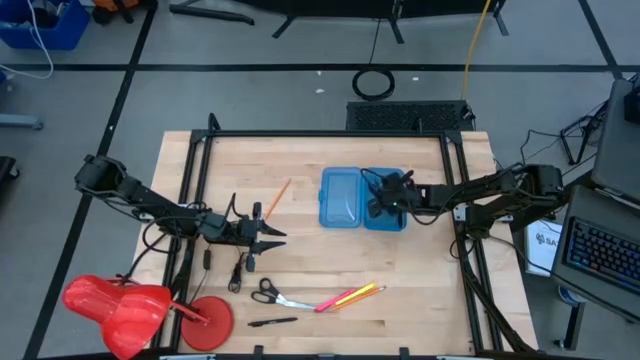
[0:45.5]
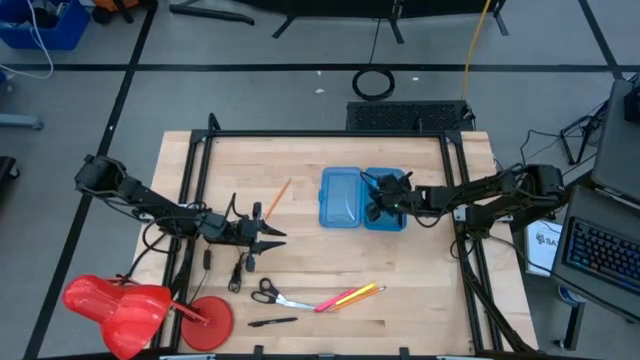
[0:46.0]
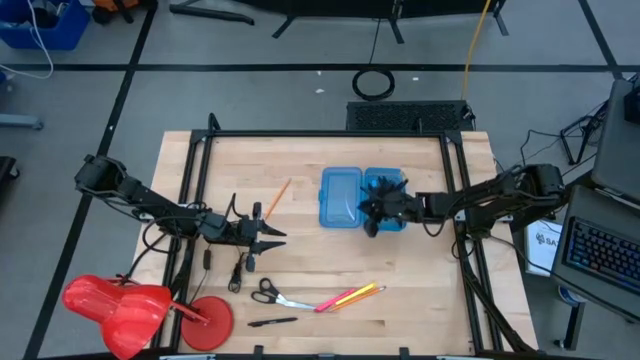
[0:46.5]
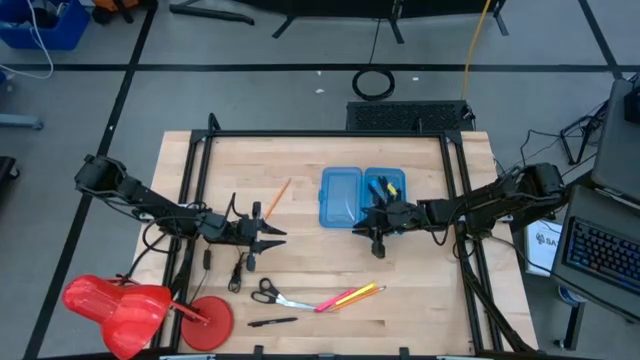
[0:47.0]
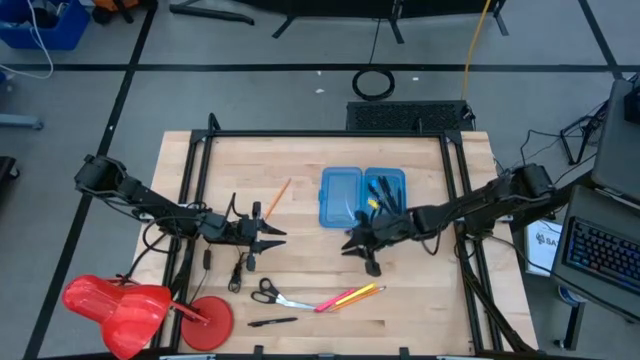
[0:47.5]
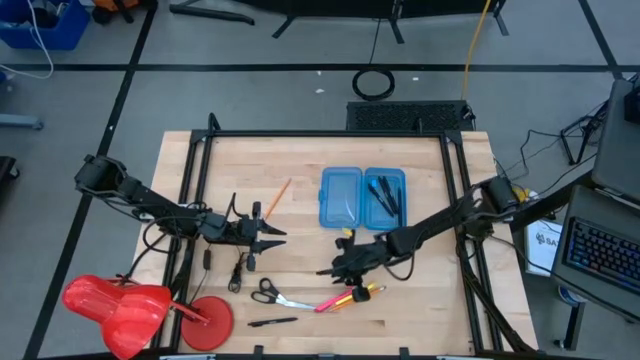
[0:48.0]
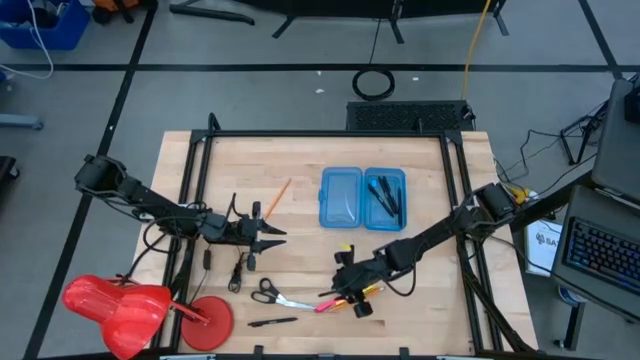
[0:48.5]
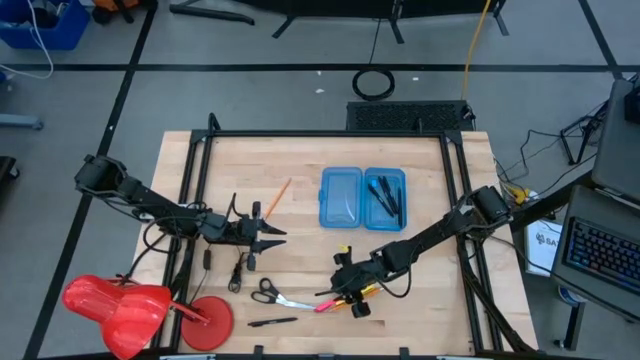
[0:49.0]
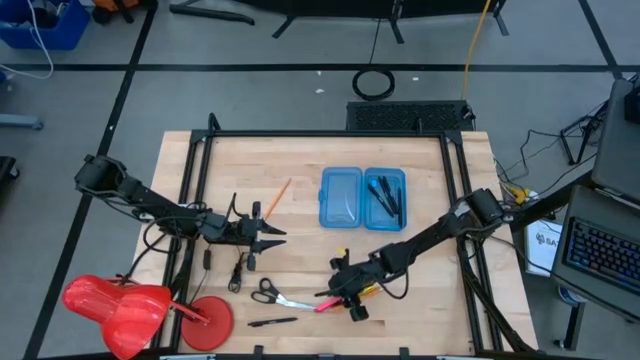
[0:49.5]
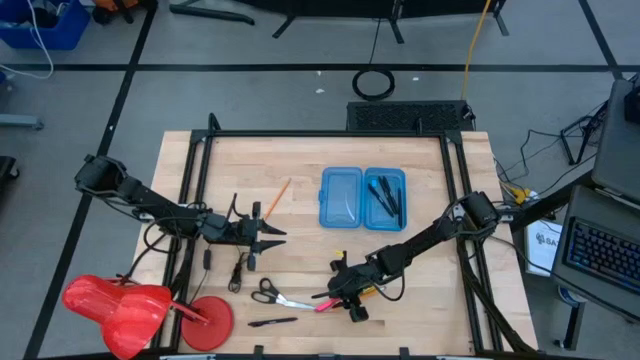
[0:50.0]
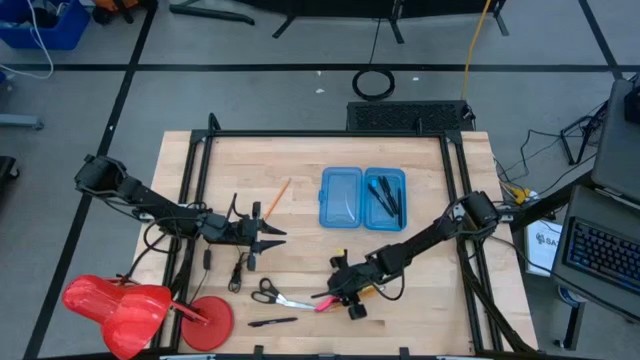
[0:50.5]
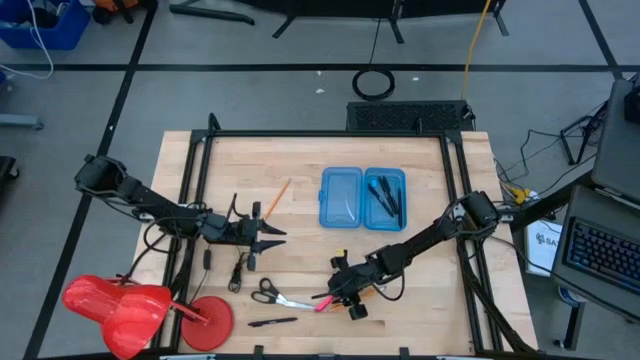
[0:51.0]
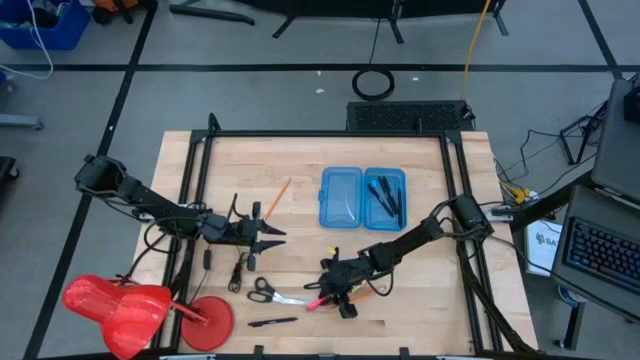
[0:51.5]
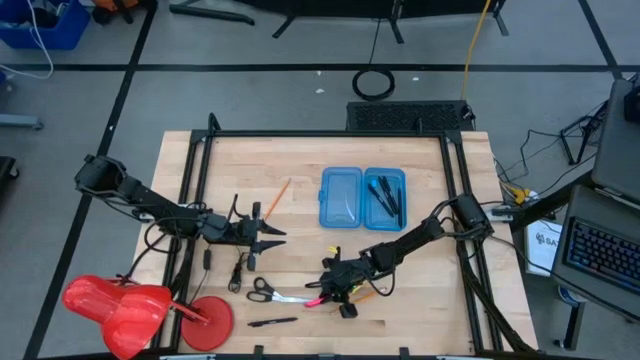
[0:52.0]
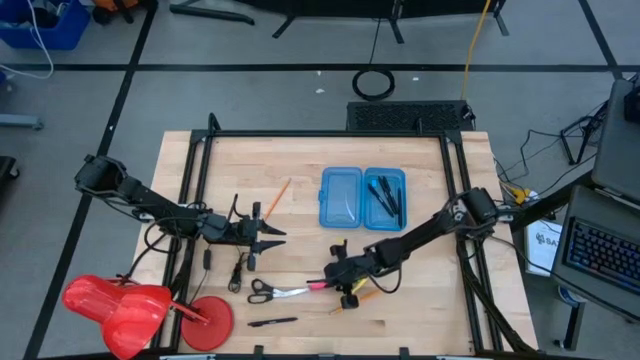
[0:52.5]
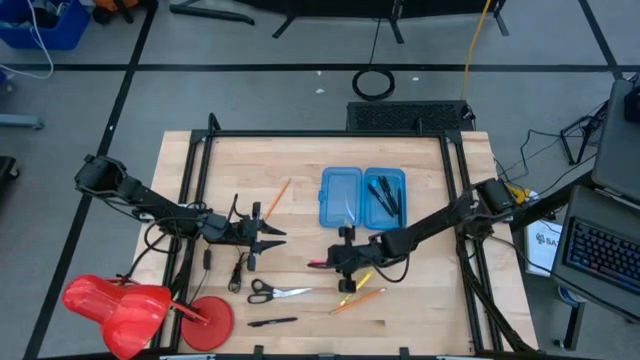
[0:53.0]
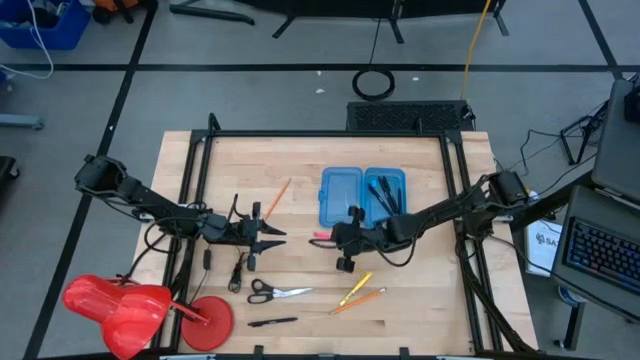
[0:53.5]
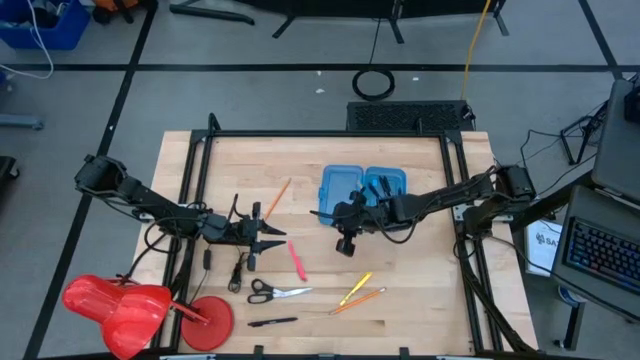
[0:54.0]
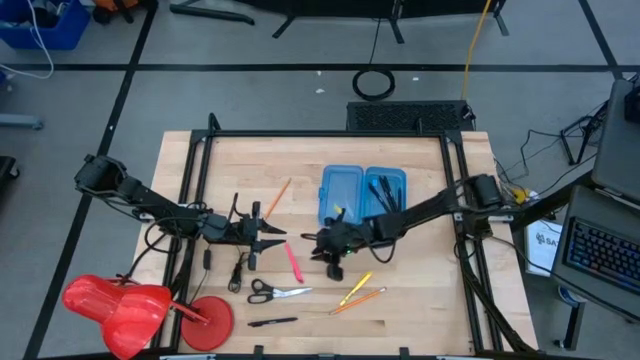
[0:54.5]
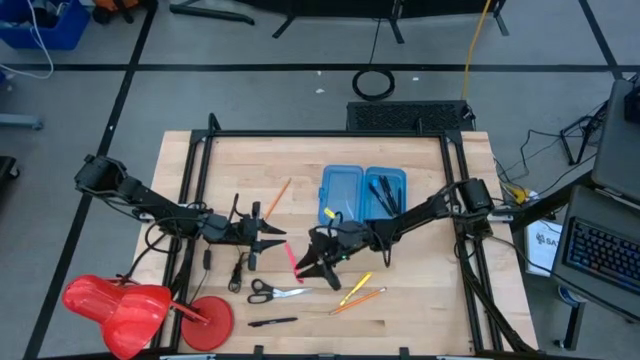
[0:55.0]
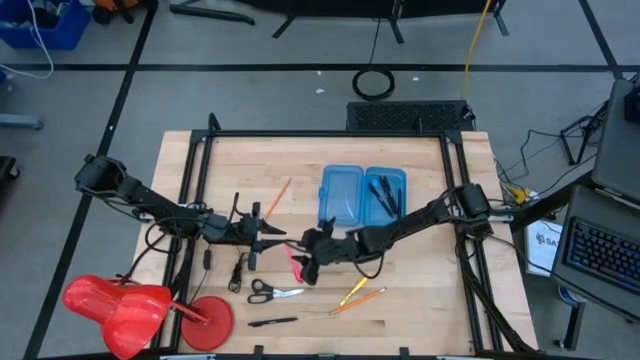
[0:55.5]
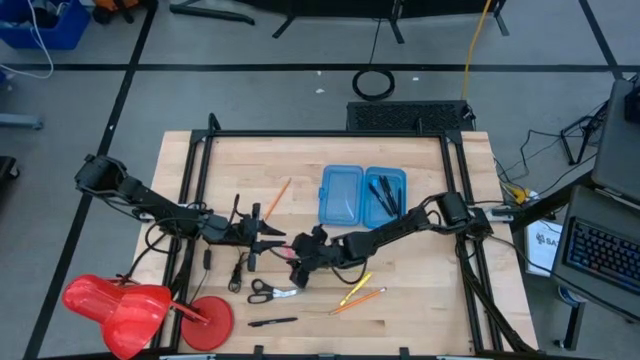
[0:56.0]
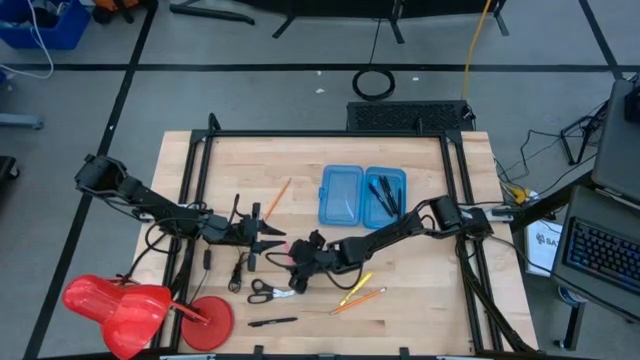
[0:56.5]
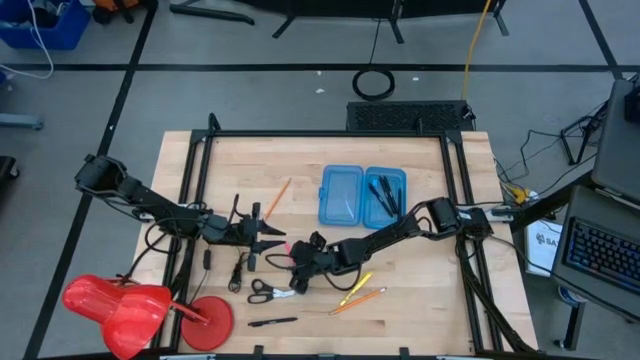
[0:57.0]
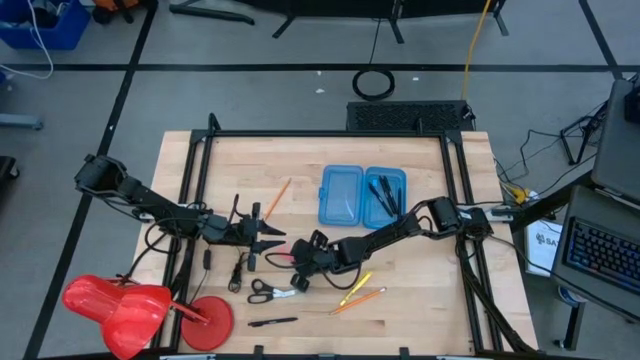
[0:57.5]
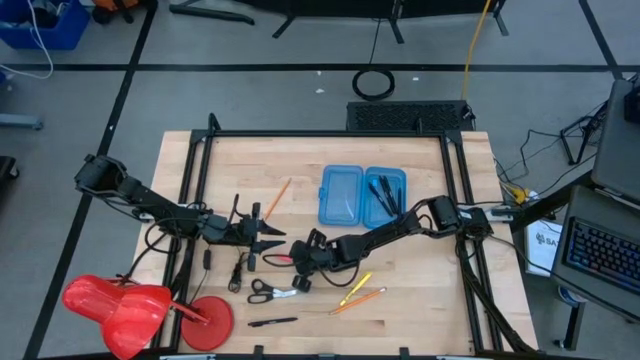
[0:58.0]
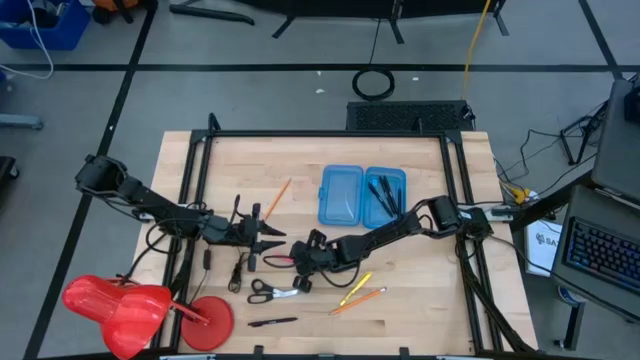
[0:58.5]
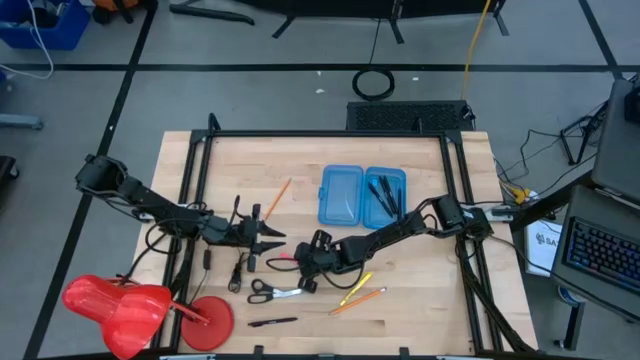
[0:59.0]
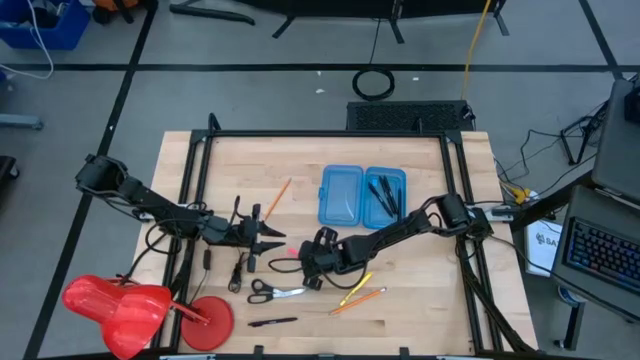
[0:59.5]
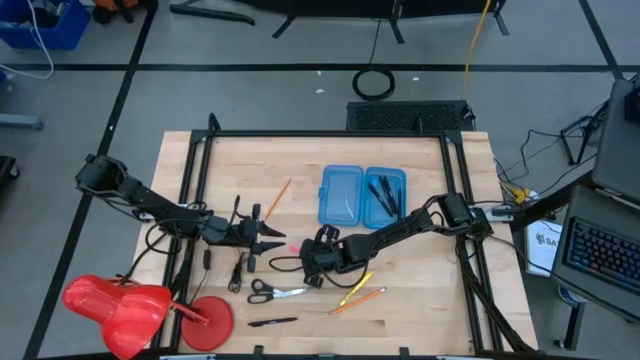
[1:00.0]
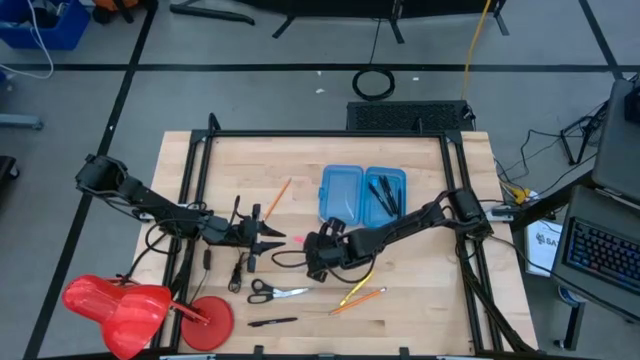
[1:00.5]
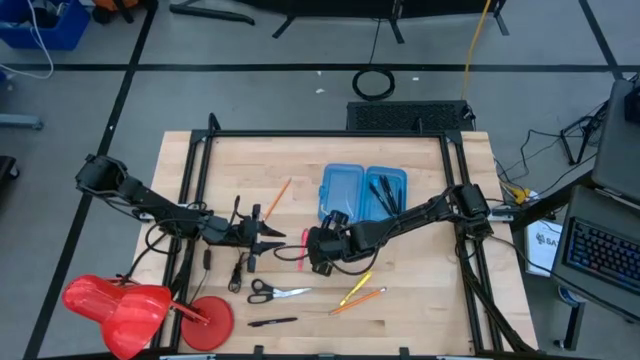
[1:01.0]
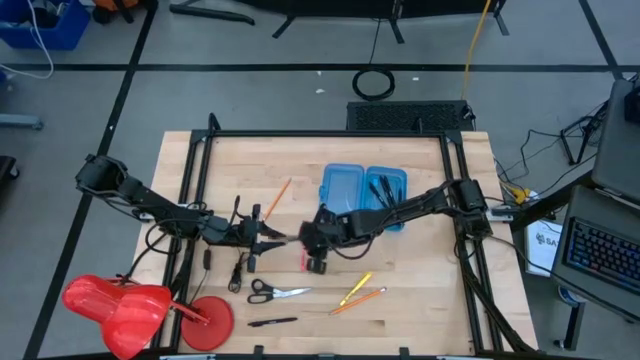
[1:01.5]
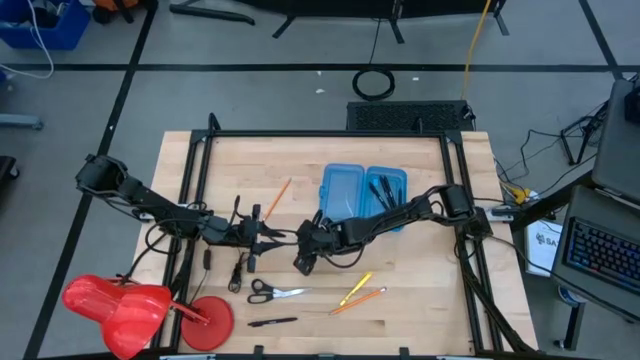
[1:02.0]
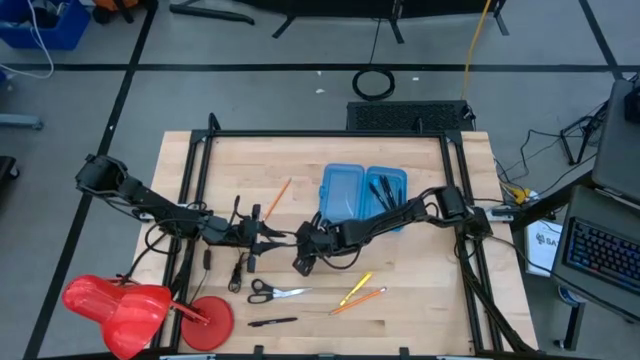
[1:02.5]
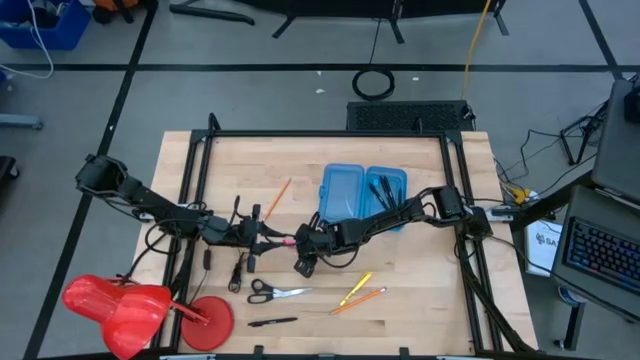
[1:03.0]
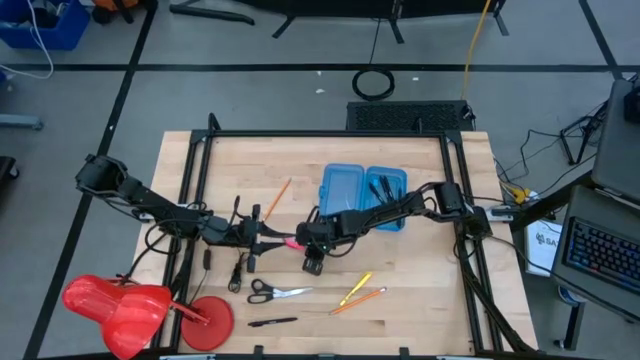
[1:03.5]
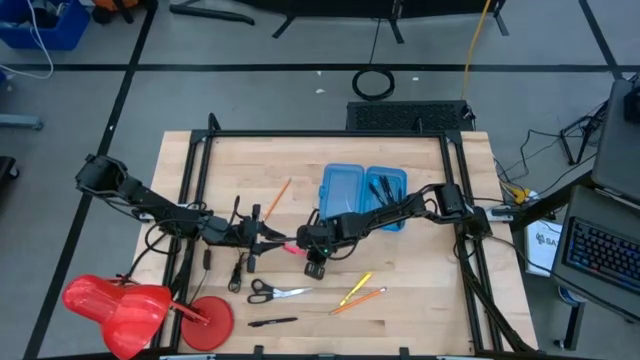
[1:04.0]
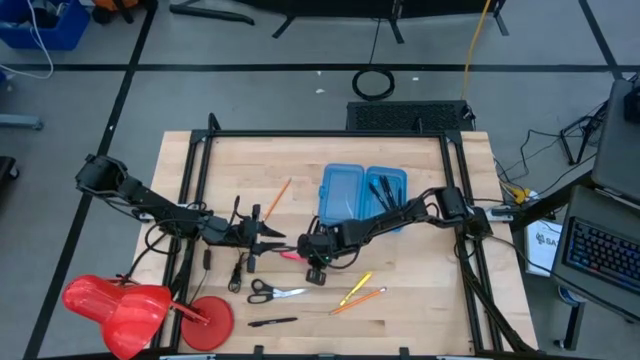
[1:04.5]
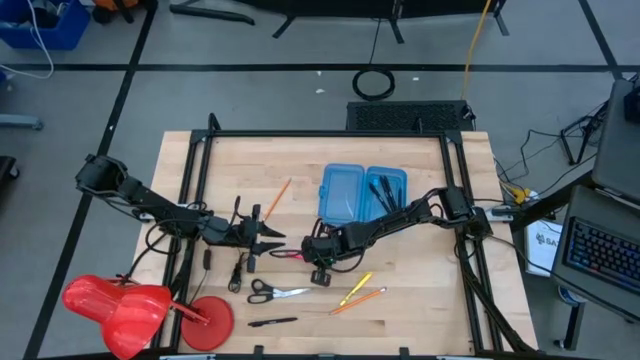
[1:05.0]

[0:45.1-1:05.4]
Task: Pick & place school supplies into a supply box
Put the pink pen into the blue supply box
